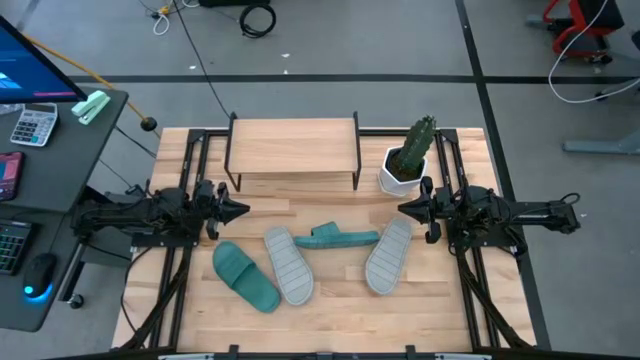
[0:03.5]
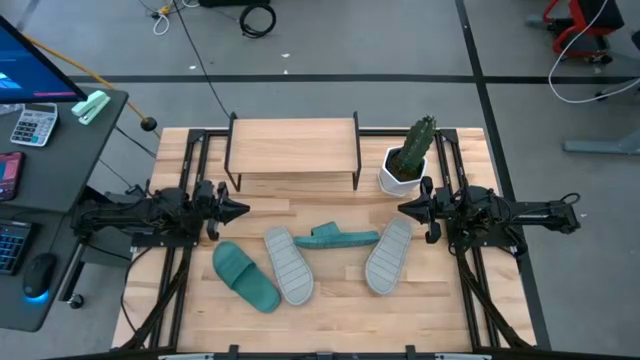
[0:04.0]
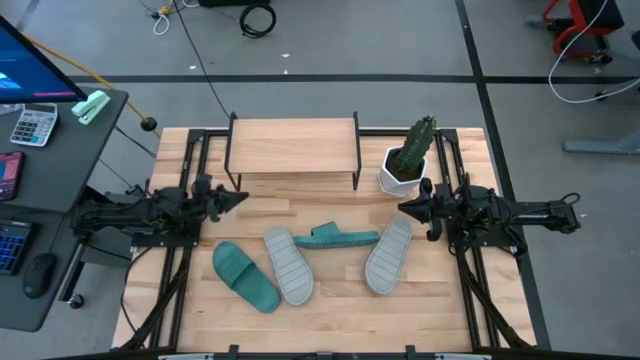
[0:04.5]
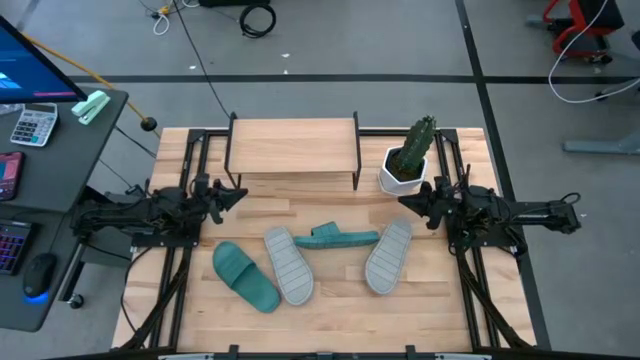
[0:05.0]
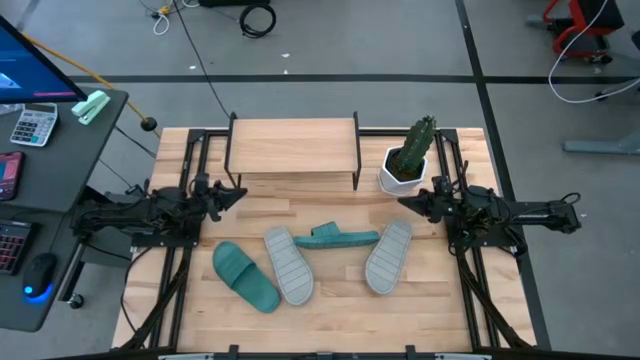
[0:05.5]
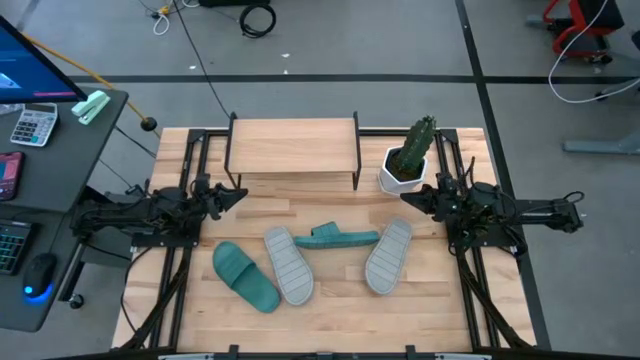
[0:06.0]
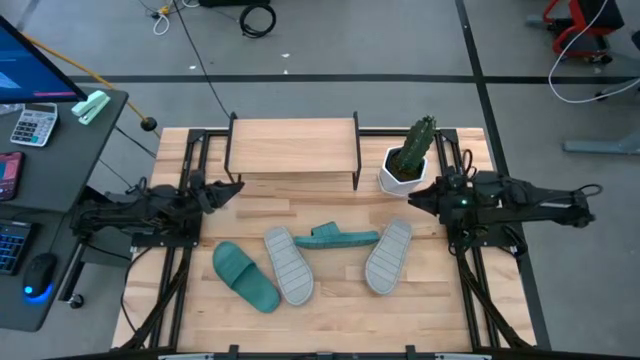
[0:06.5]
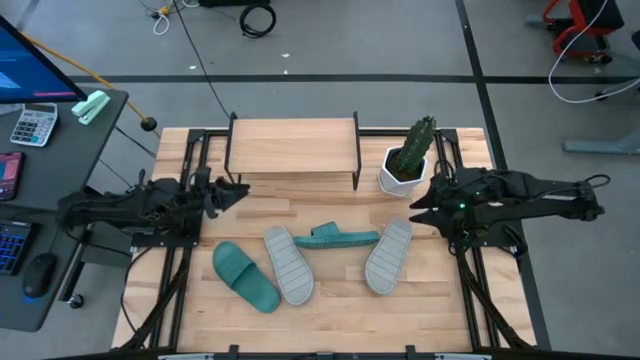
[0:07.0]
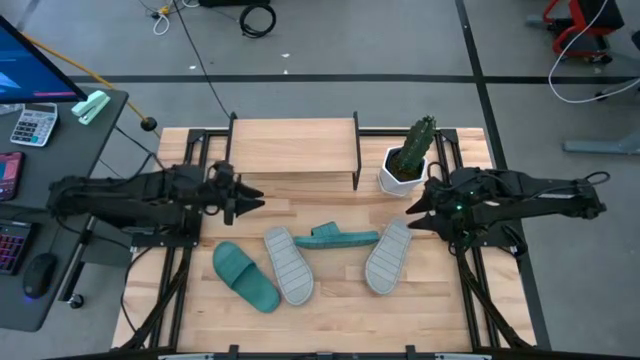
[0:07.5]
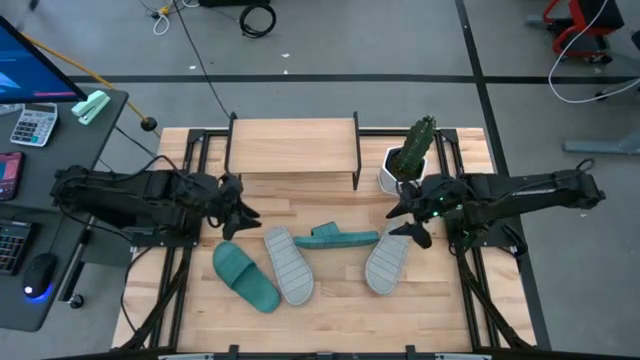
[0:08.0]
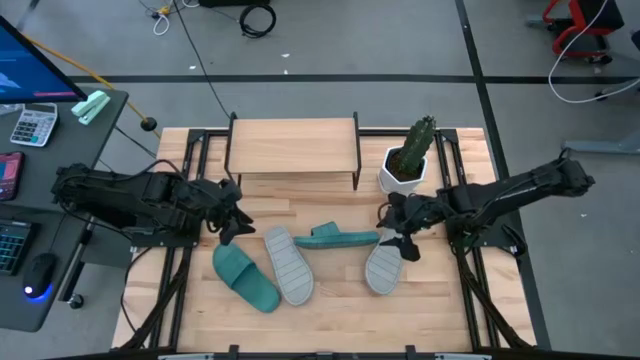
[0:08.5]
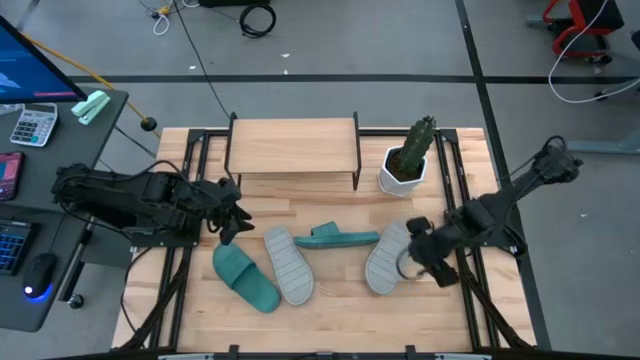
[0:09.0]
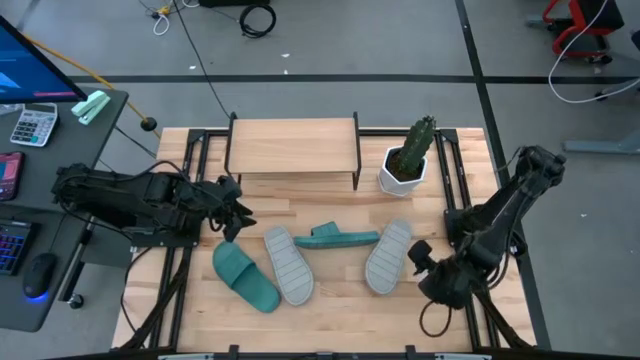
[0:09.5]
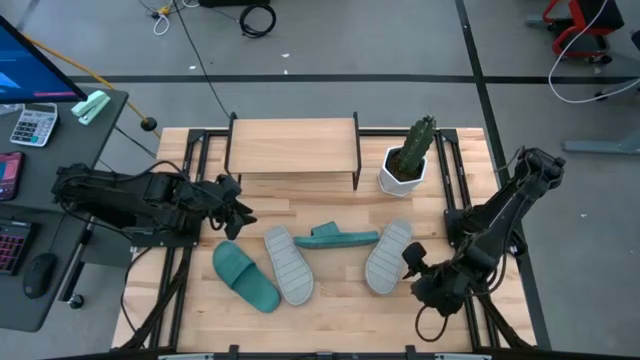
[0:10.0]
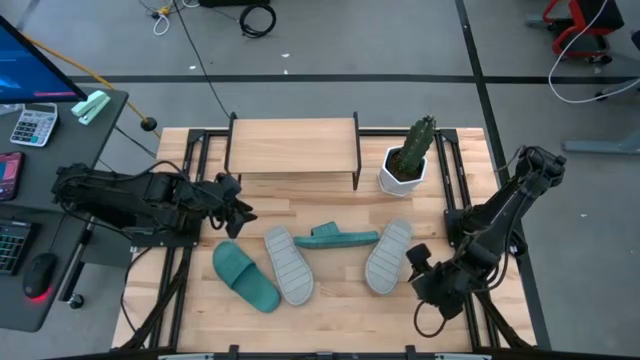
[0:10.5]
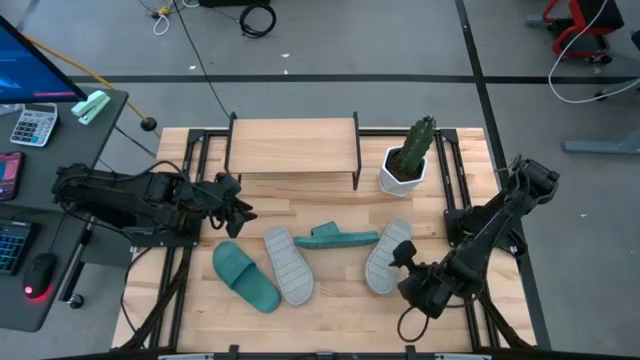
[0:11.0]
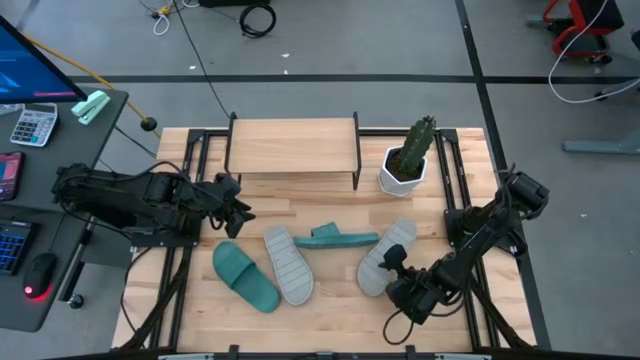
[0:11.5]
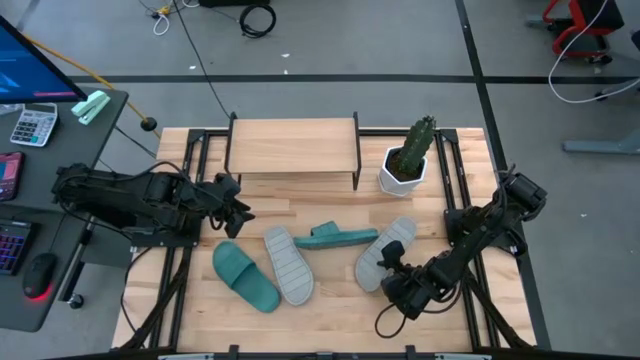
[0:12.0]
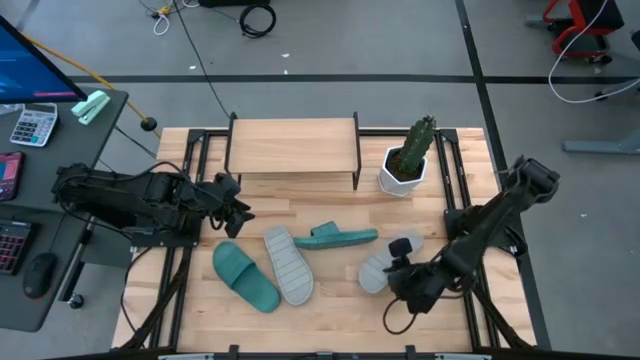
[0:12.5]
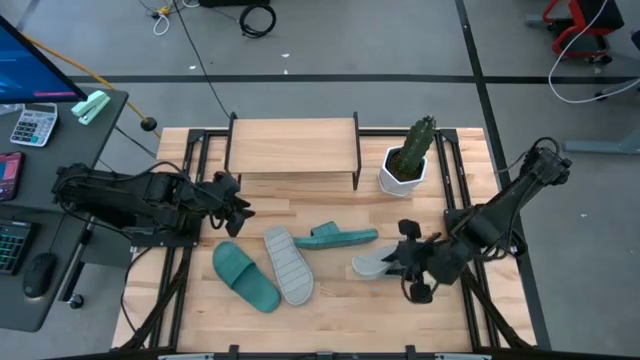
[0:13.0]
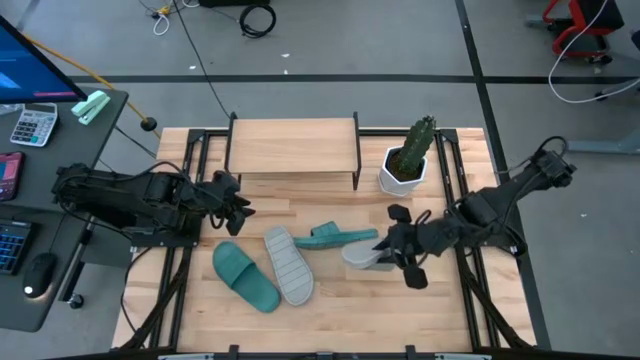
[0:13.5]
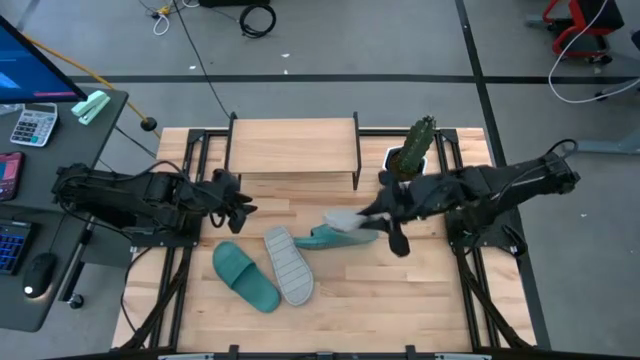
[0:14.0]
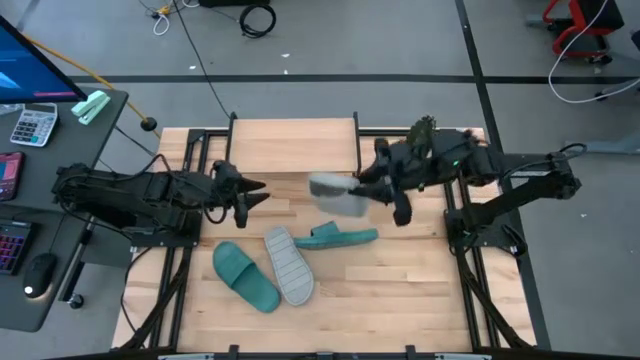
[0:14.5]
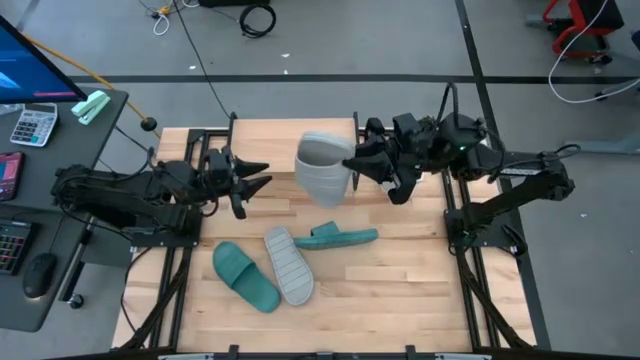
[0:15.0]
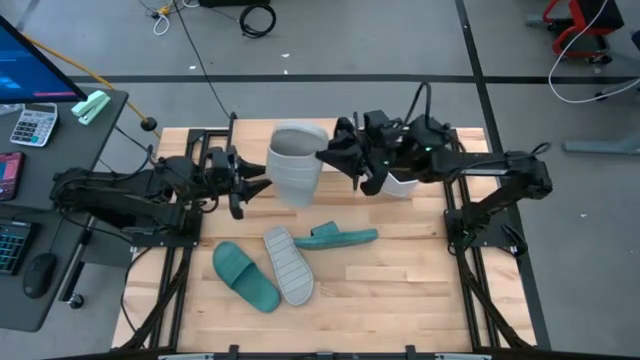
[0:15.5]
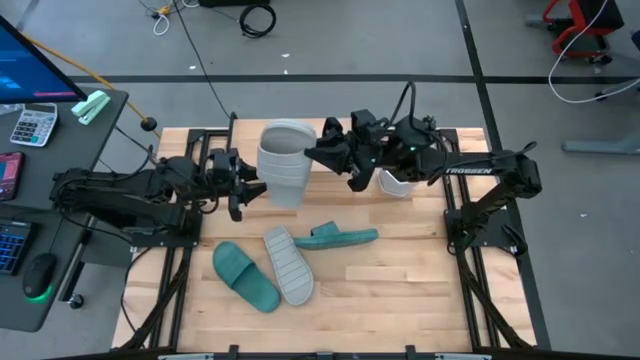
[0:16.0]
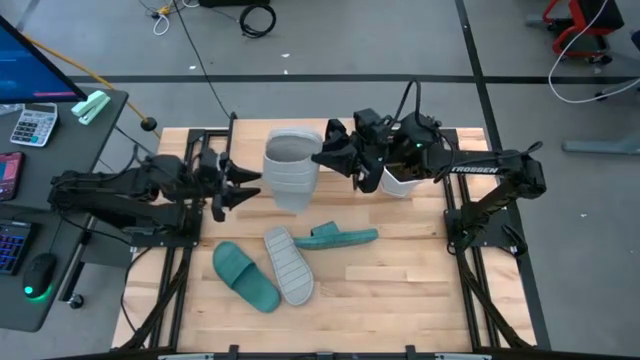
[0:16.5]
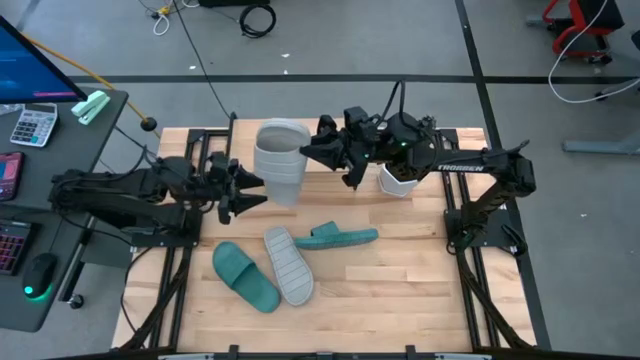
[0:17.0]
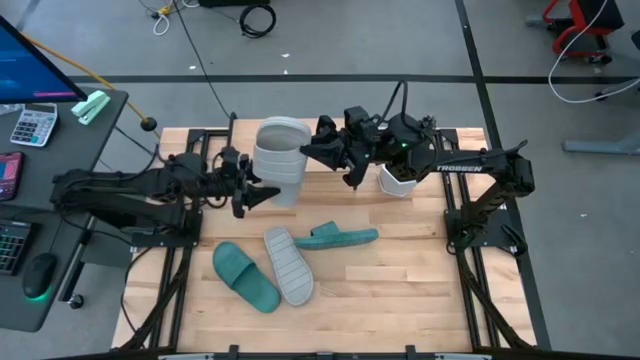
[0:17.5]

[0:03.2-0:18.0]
Task: Pick and place slides into the shelf
Put the right gray slipper on the shelf

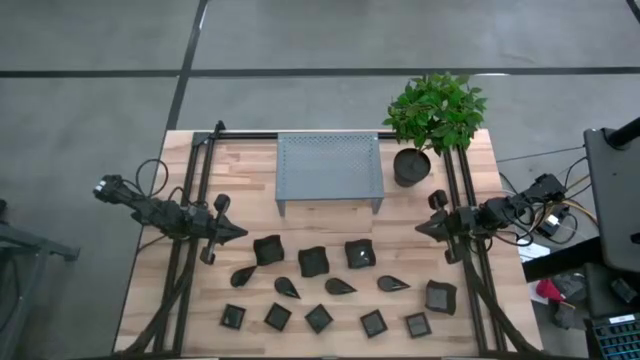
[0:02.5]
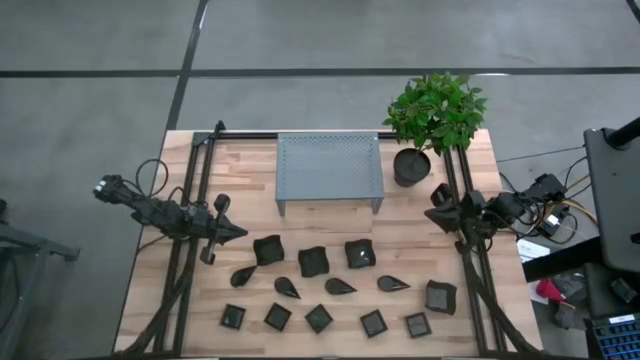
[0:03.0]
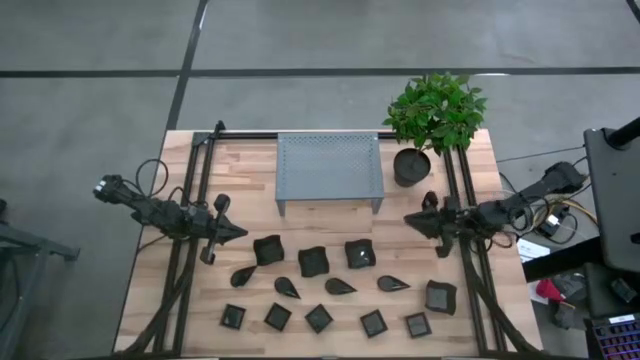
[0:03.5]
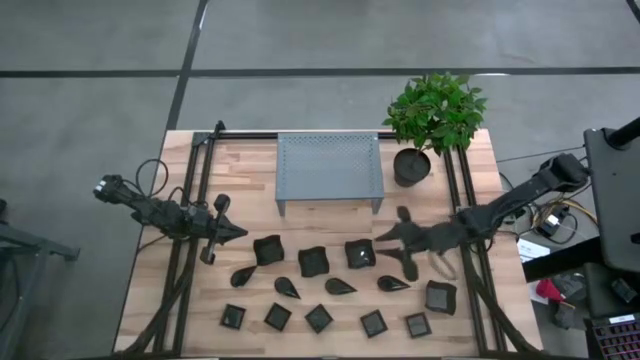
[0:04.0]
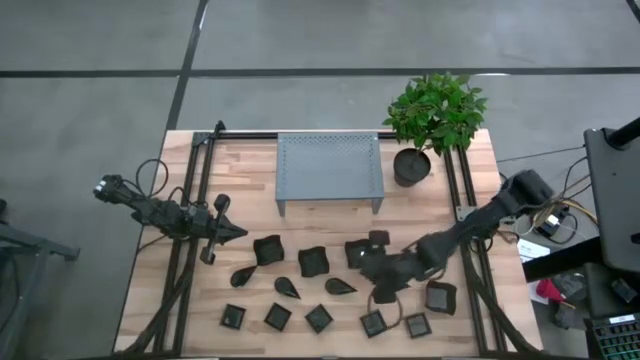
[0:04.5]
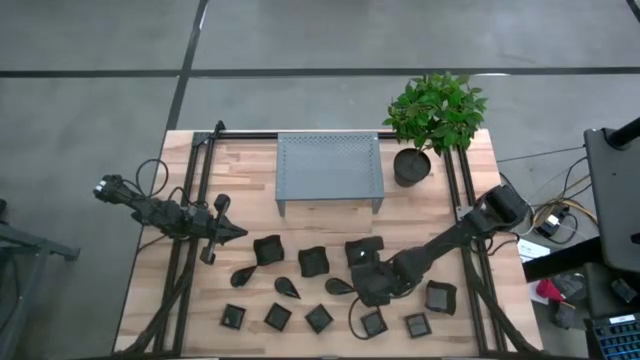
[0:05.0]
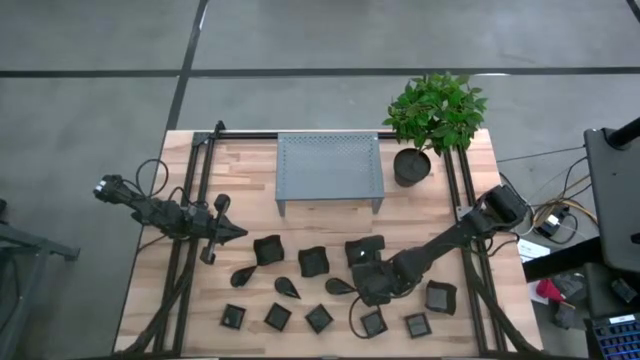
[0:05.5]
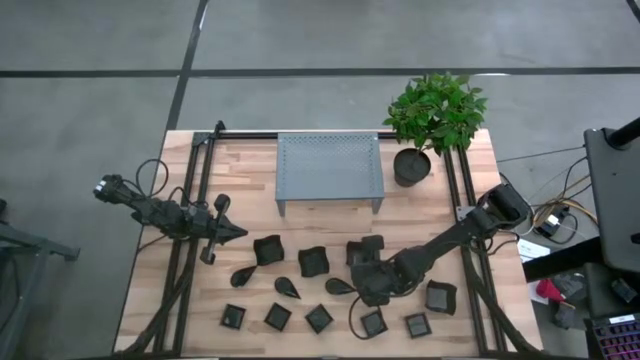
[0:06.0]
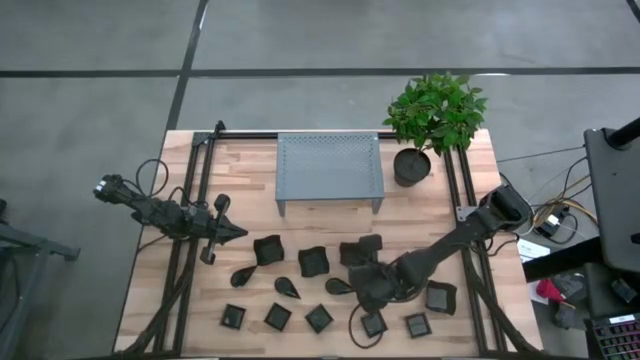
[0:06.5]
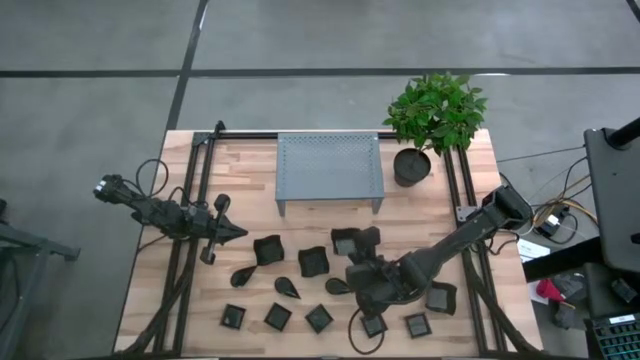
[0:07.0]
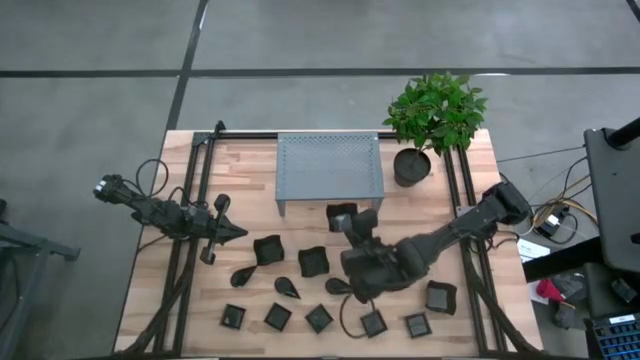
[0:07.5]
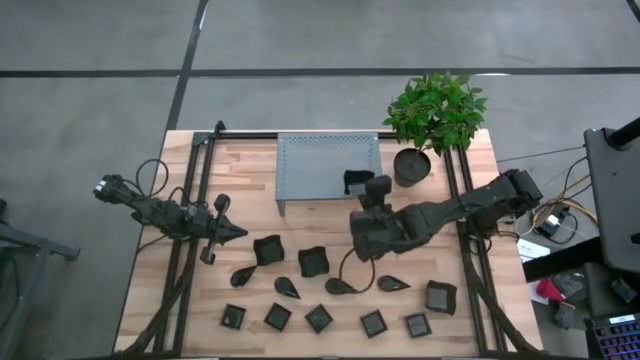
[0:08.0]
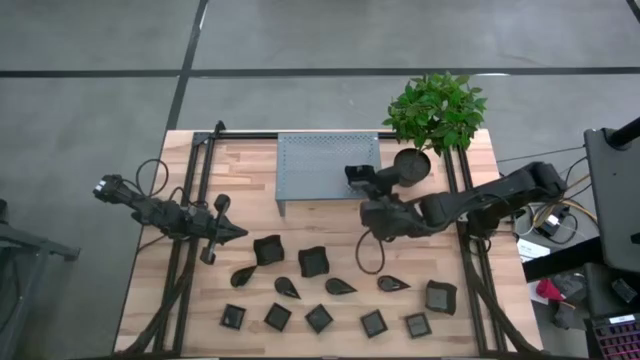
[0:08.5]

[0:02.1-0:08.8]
Task: Pick & Place Mini shaped plates
Put the black distorted square plate on the shelf
